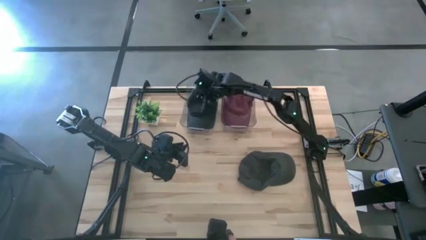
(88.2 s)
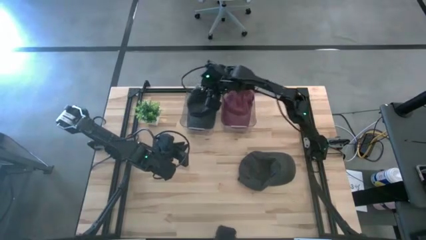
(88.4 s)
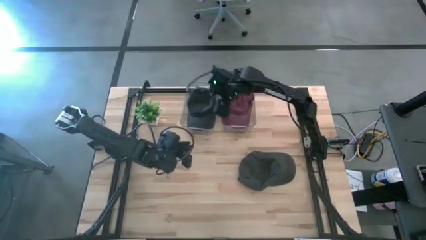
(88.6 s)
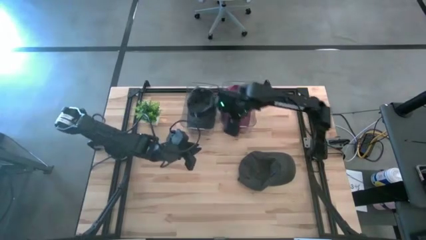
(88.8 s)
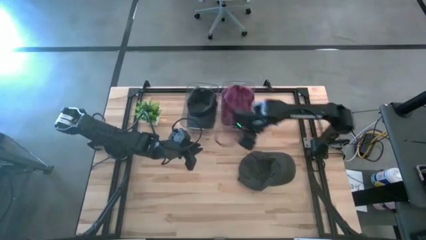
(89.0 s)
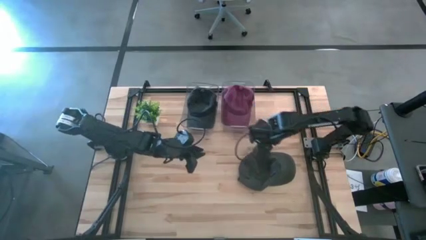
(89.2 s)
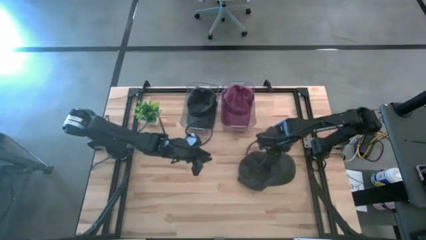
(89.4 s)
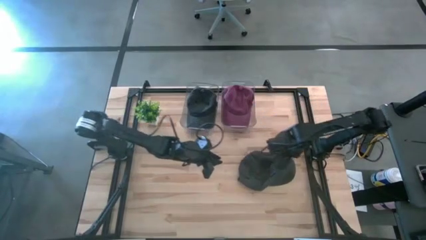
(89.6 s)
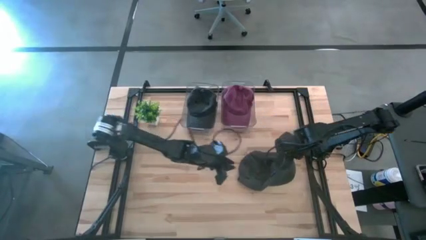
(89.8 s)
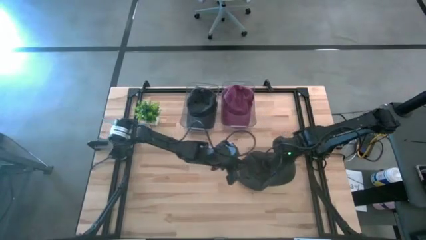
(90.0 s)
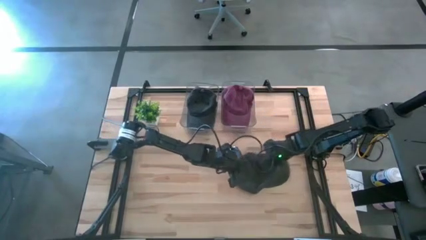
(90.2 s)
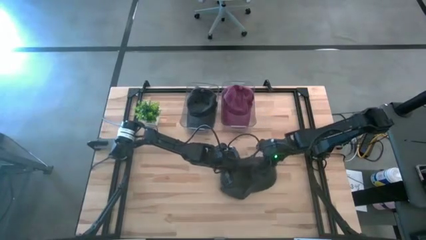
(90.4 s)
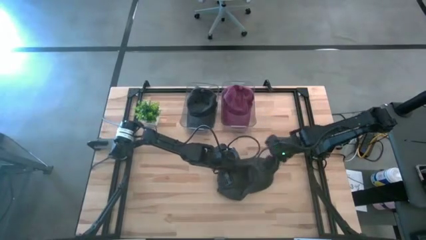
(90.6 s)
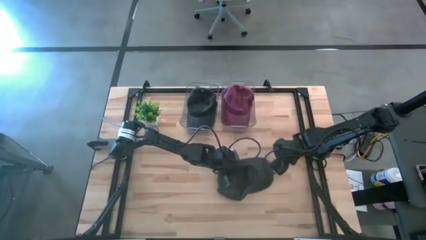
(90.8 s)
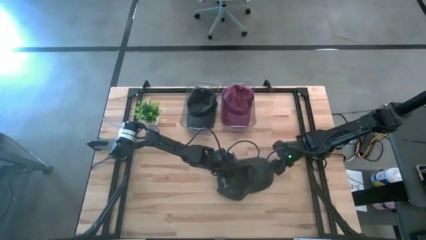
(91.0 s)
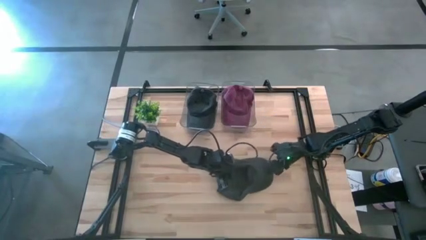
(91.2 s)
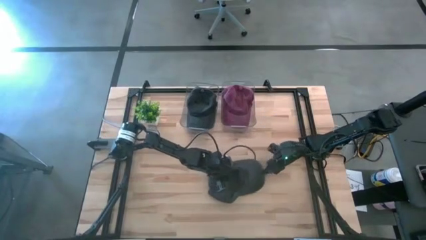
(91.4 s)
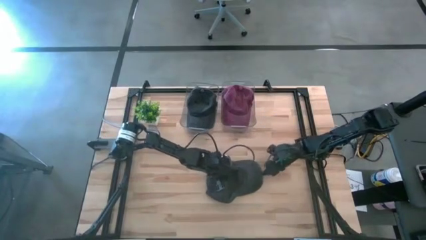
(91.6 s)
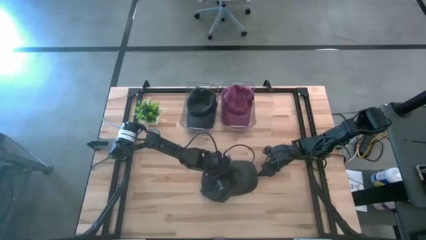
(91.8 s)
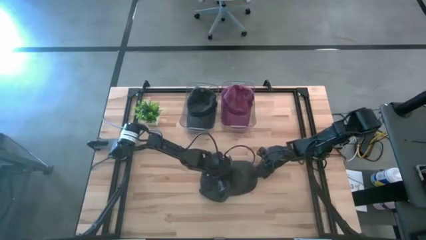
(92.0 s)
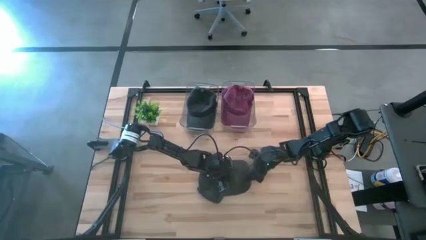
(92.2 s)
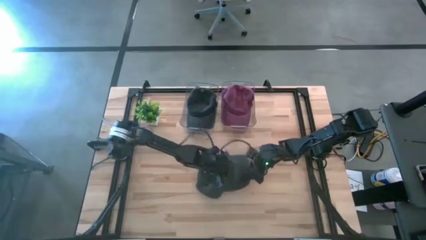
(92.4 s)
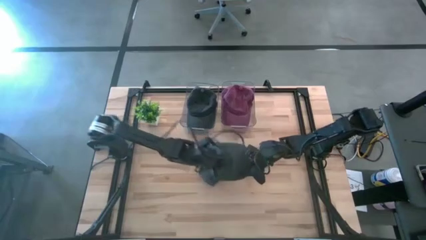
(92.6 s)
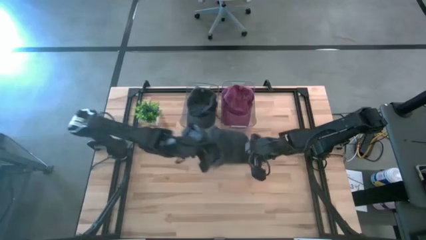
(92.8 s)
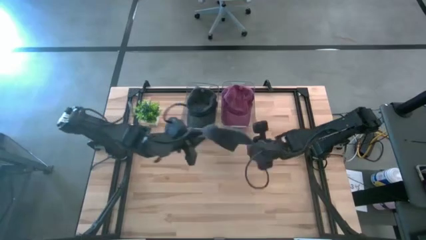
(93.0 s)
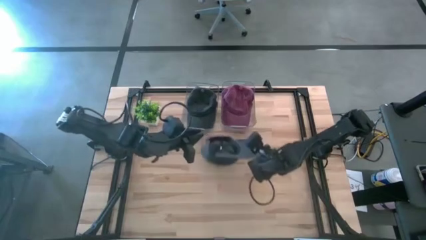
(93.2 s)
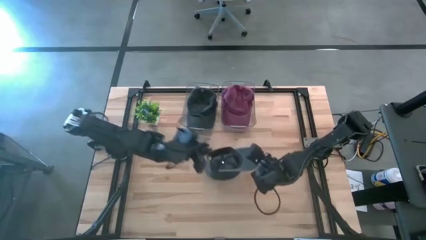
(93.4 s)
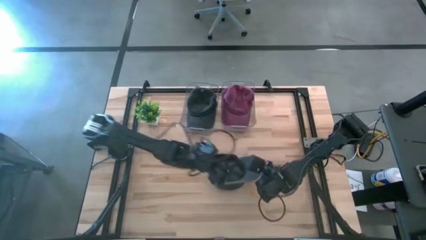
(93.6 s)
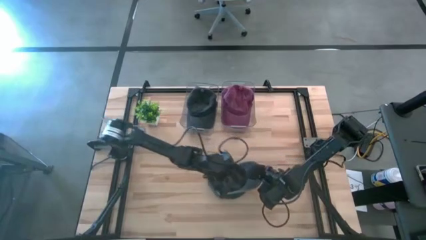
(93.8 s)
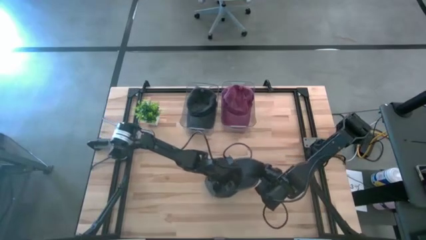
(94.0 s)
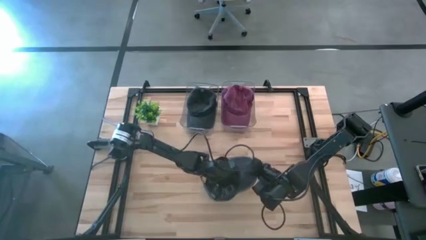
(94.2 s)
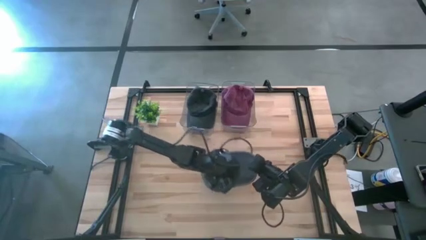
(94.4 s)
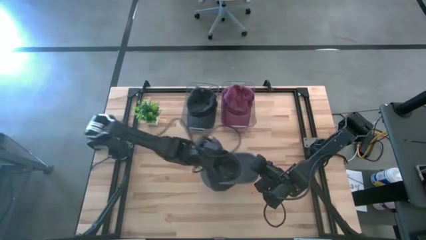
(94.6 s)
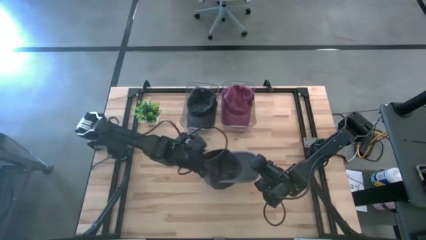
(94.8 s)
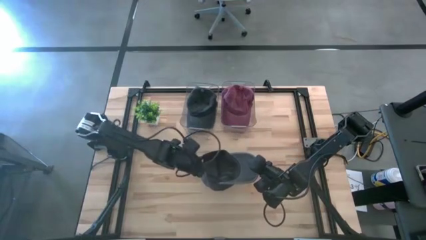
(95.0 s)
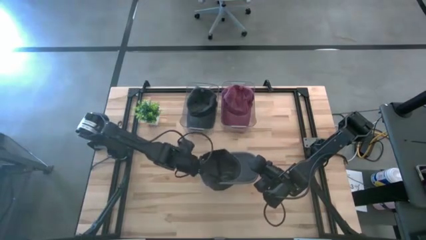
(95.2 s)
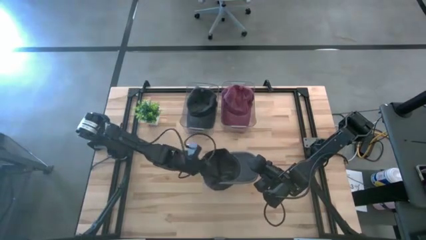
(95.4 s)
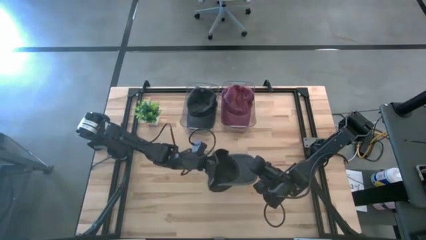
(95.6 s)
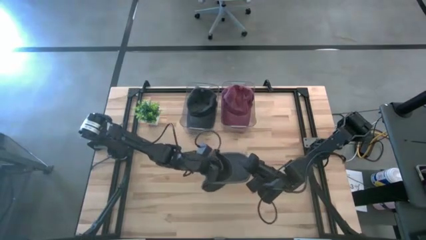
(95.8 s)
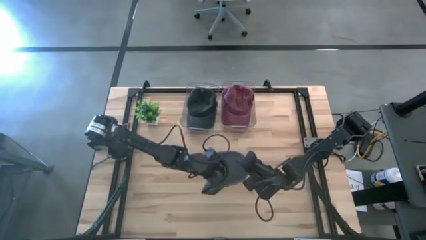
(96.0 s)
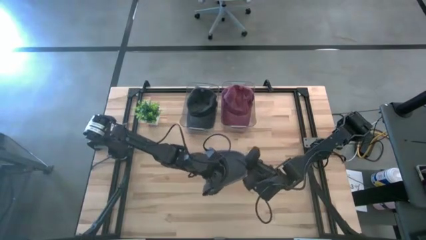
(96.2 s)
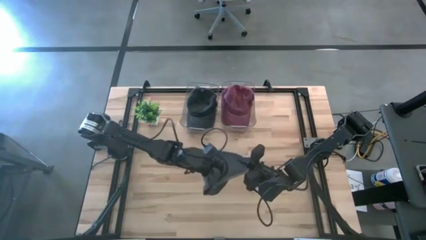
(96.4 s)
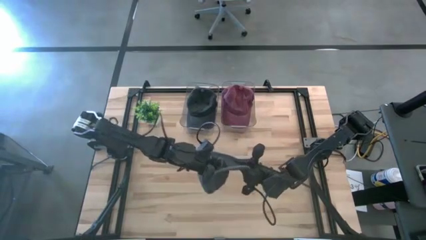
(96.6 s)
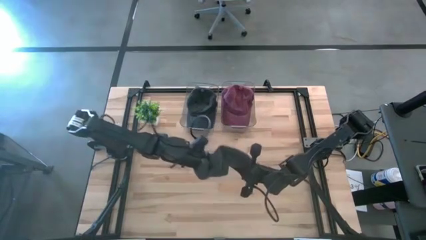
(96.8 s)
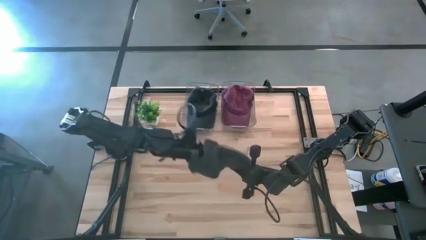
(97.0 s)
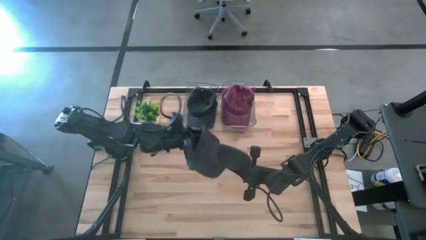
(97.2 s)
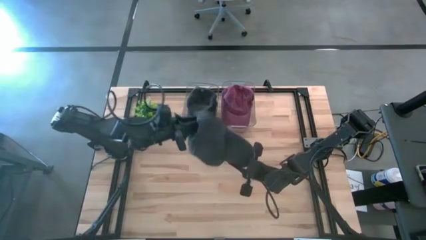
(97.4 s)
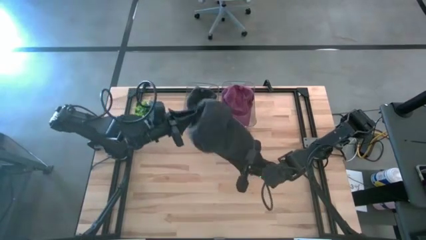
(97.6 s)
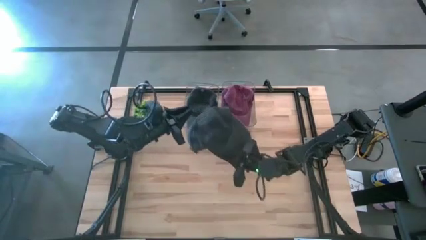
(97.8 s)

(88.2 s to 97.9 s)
Task: Pick & Place hat
Put the black cap into the left transparent bin

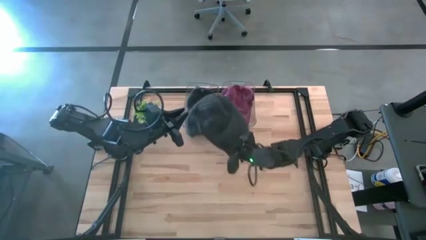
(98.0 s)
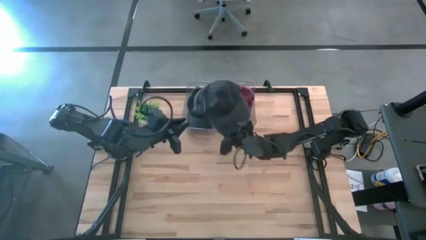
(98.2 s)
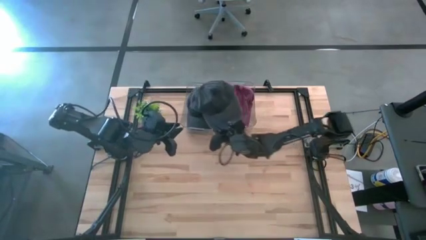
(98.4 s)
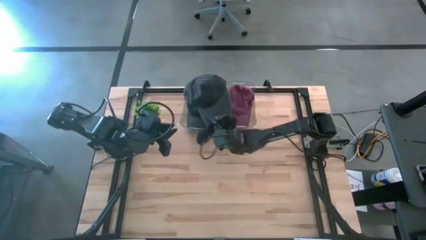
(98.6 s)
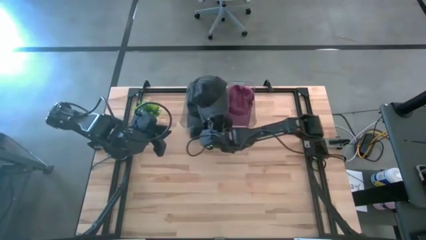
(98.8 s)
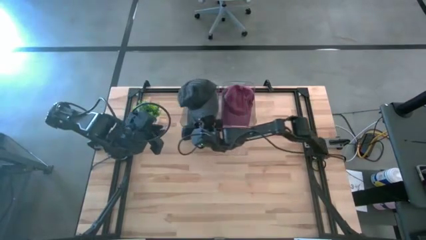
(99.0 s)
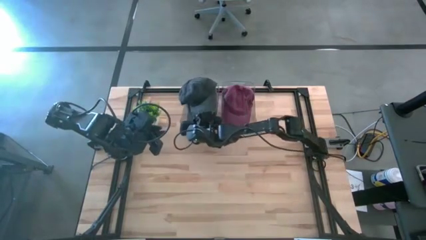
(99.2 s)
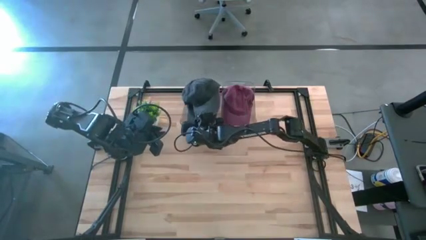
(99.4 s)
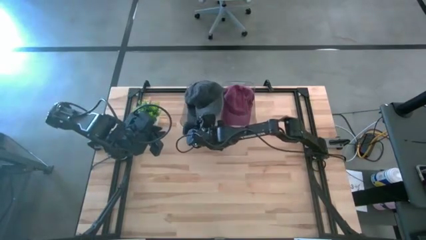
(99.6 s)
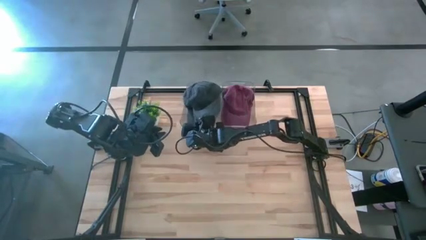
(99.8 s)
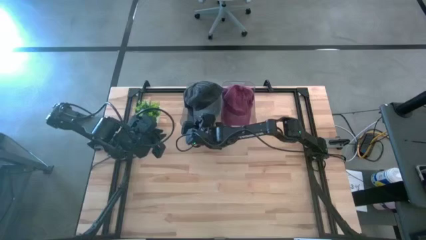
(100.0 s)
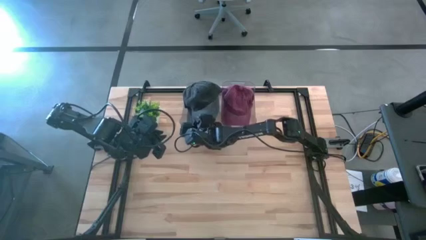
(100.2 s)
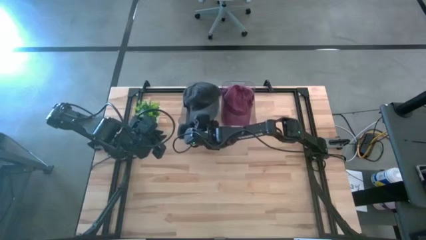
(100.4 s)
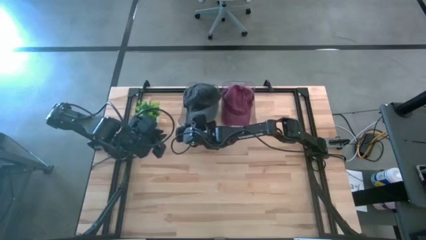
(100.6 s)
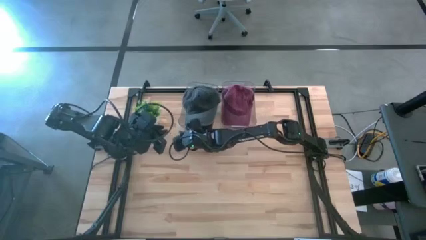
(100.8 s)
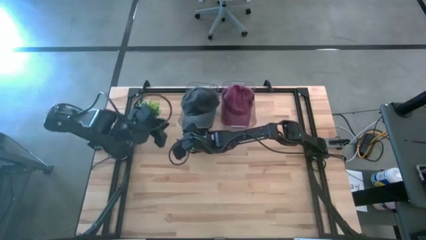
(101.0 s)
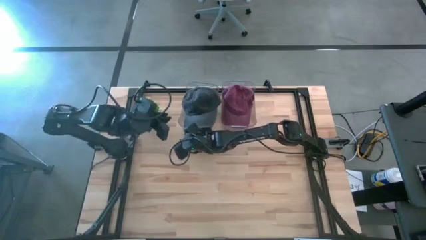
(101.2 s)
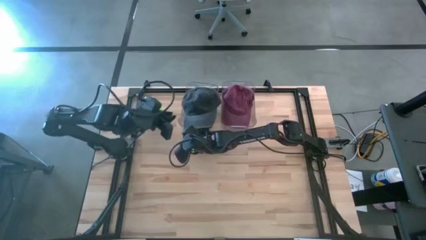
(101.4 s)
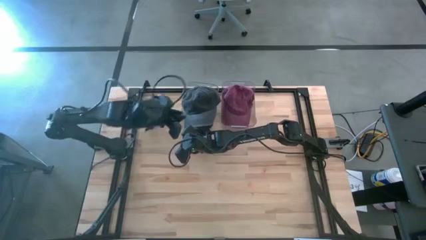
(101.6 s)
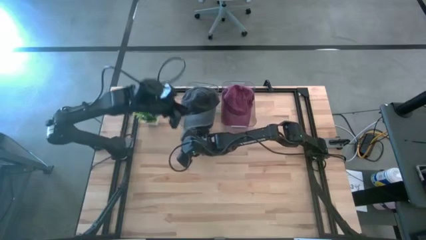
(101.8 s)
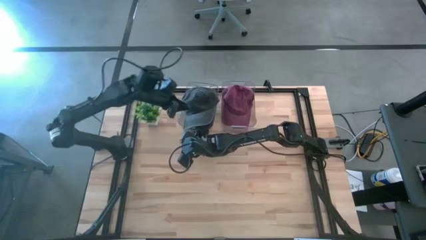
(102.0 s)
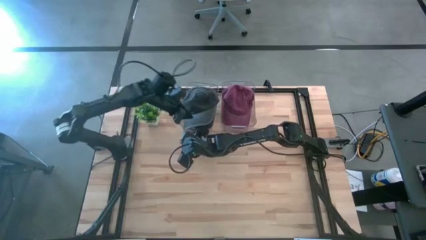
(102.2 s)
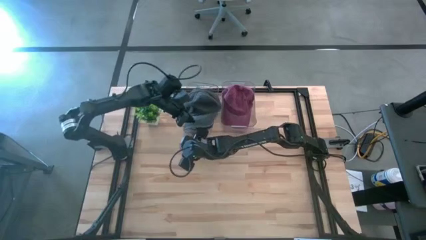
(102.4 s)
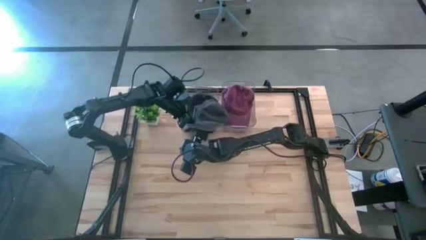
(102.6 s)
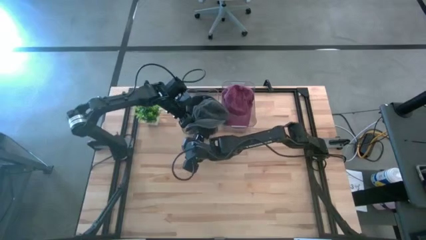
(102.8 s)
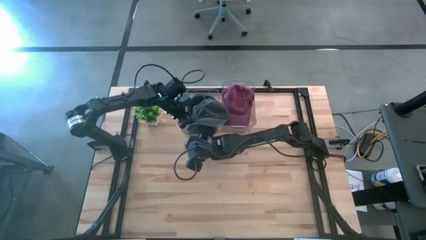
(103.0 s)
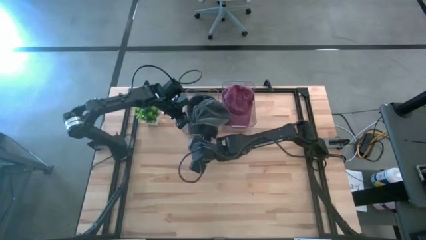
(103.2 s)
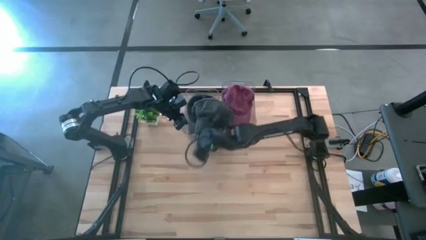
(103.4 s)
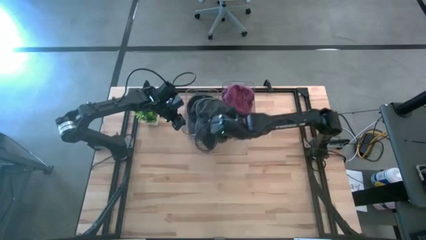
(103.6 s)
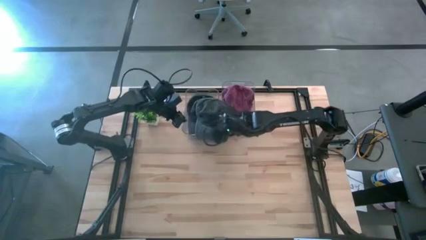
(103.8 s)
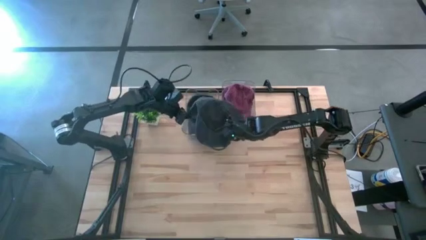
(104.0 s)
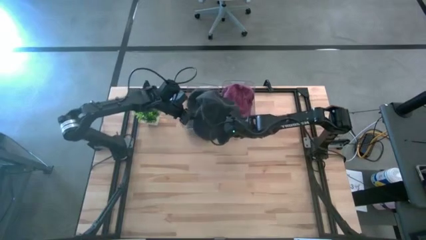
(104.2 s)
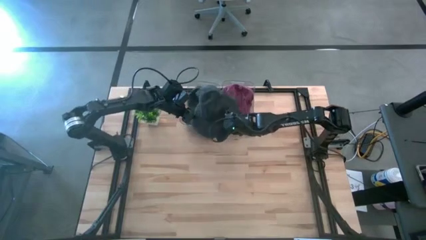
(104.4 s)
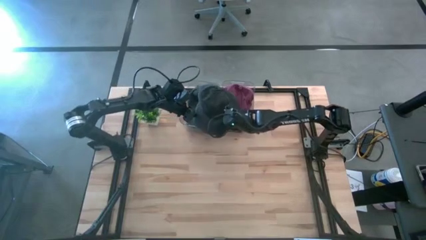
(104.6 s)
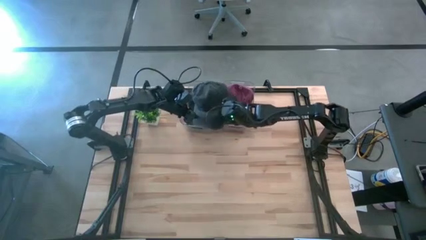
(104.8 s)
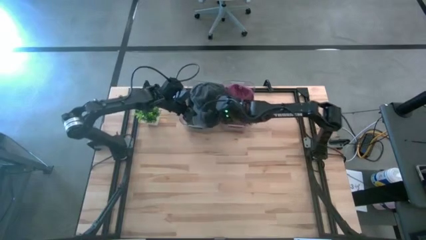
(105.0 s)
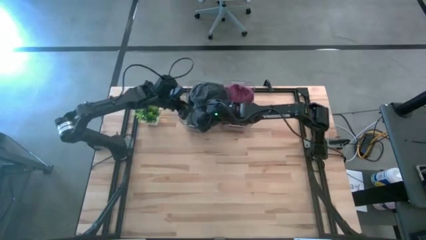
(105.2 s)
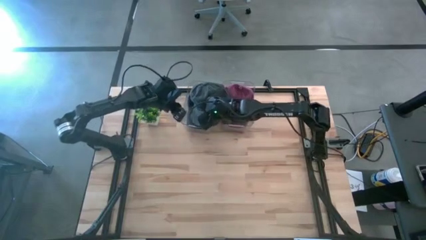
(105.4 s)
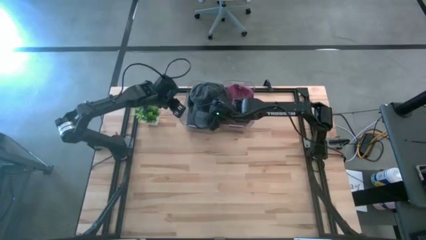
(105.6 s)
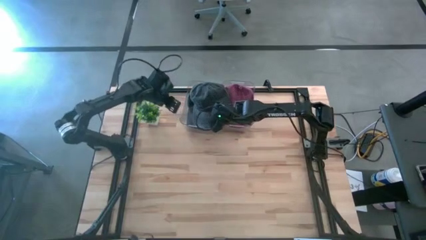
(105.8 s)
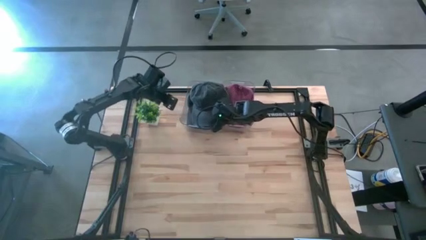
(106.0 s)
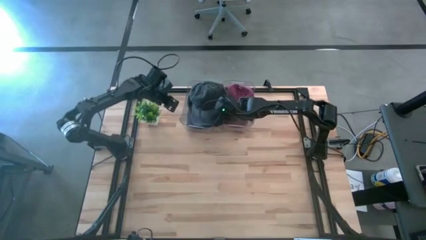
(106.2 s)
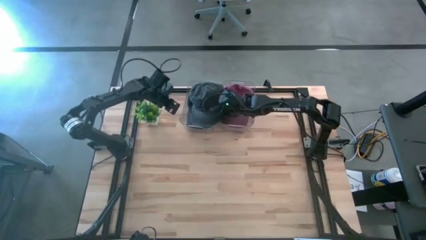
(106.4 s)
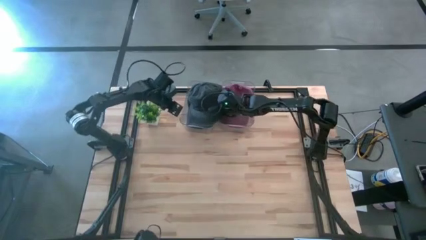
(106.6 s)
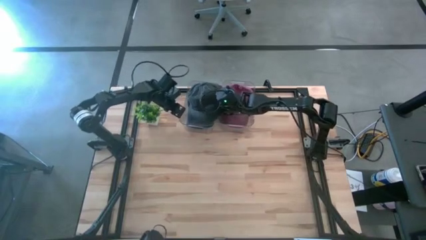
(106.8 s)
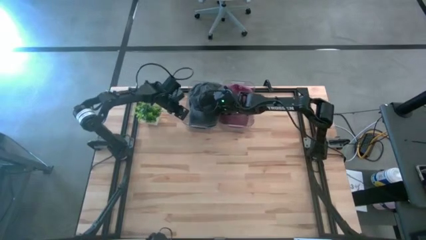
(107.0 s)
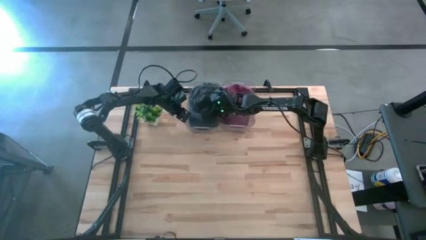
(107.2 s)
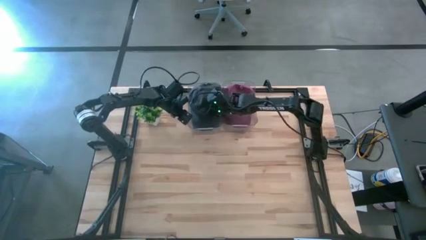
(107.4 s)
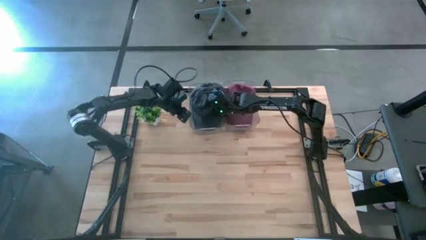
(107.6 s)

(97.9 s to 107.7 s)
Put the black cap into the left transparent bin
